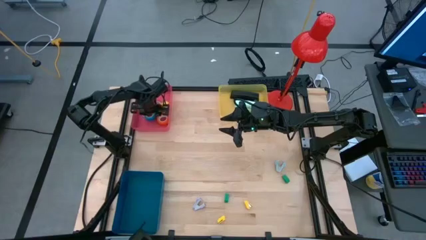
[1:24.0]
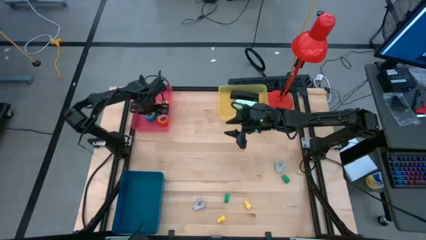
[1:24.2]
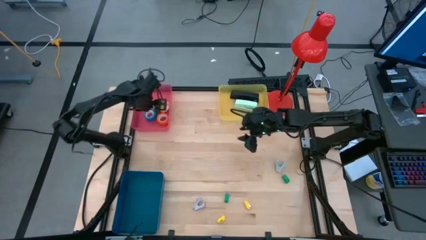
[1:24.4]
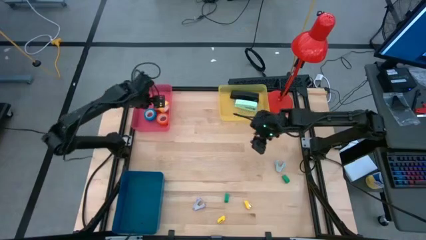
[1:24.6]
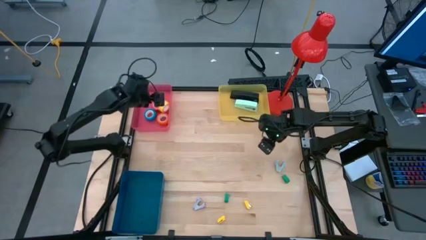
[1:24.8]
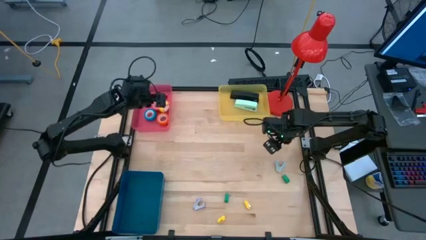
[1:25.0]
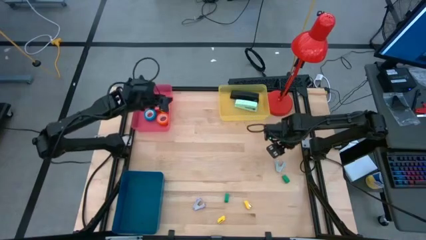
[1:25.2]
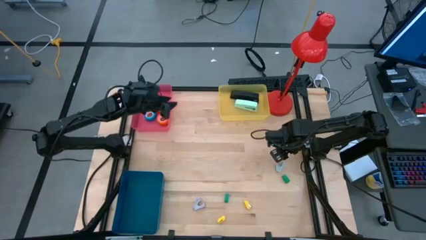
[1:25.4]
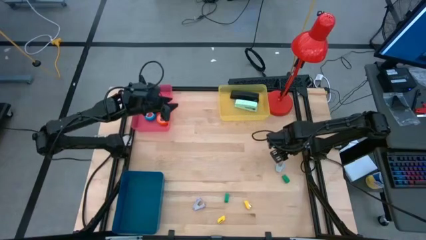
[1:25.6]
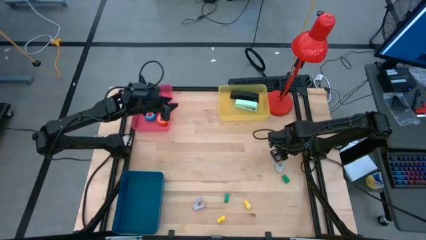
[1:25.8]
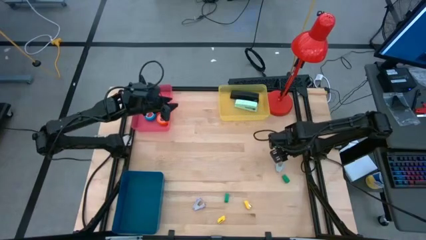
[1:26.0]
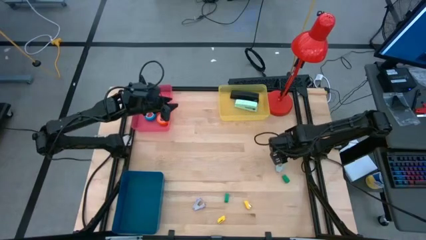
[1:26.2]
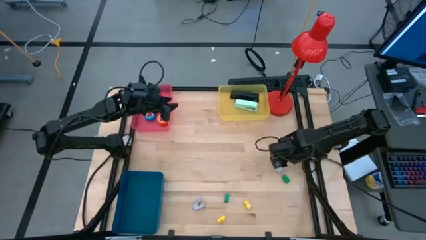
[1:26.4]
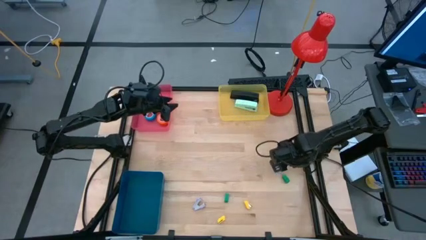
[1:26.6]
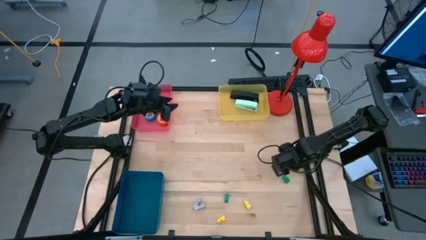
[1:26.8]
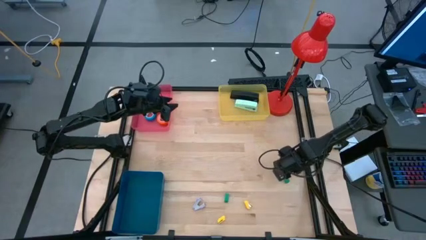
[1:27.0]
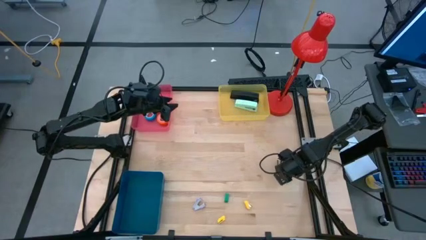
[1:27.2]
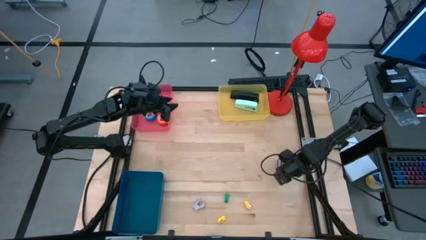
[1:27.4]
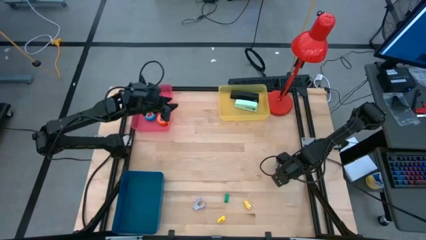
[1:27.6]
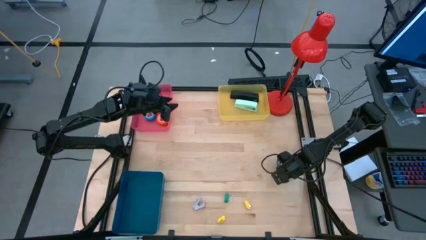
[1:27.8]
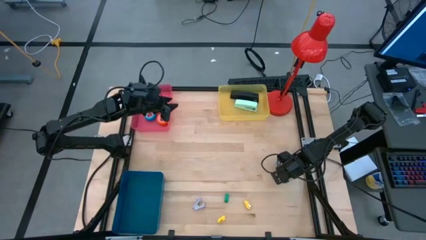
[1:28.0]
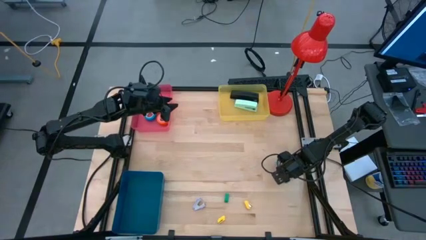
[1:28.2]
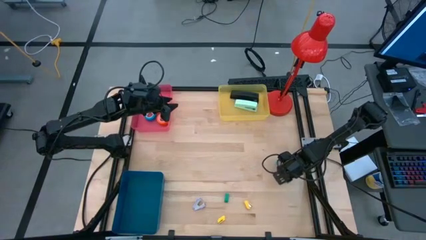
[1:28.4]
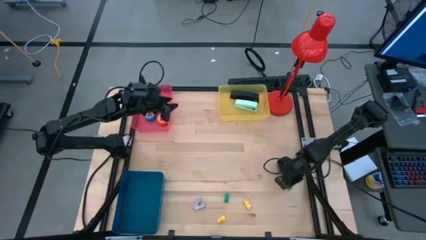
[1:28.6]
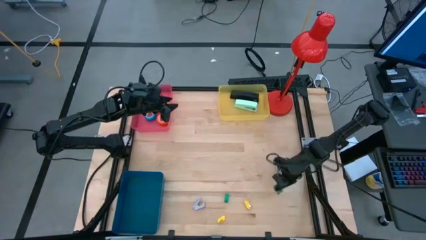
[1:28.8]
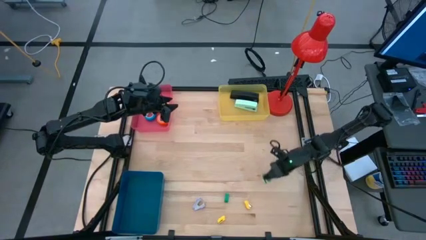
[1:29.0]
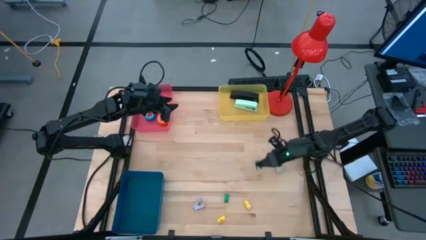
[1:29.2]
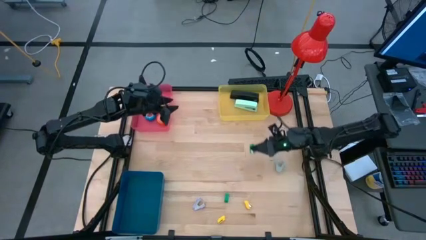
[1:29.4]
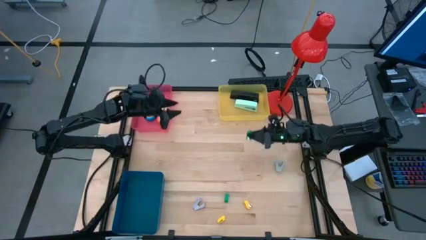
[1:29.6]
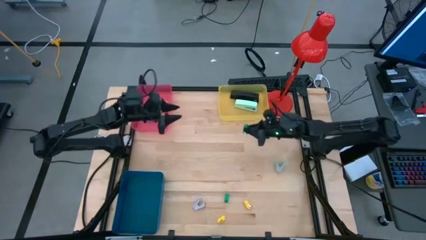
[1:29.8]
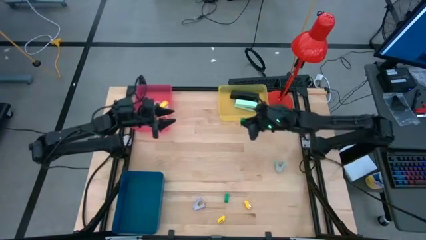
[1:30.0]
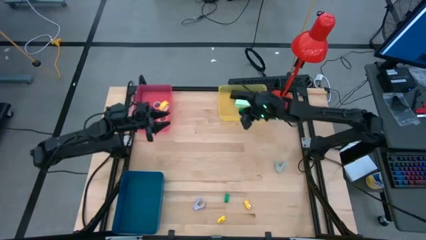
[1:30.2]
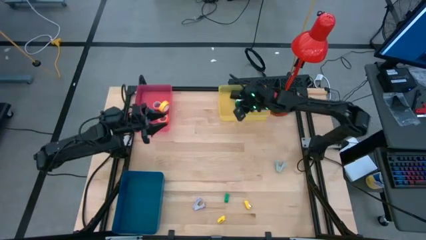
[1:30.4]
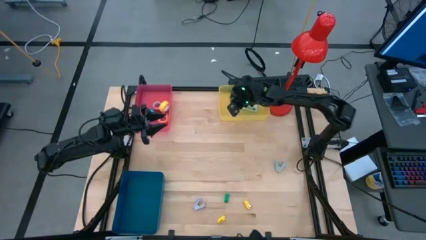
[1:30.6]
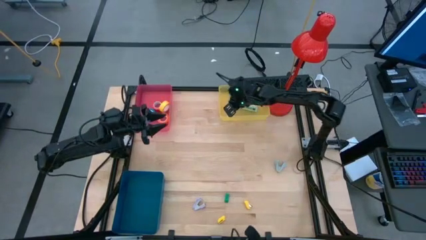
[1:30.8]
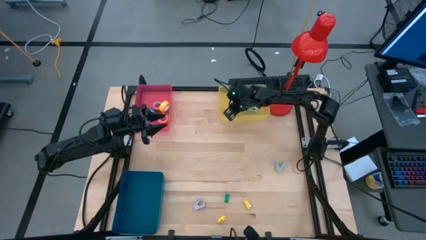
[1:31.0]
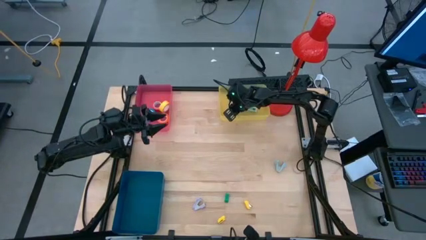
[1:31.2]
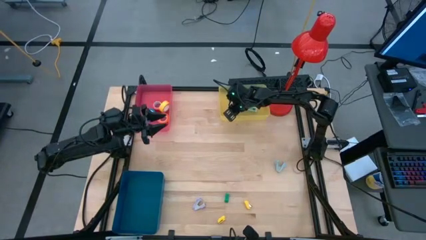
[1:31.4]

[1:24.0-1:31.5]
Task: Pick and place Stapler, Stapler remover, tape
Put the small green stapler into the yellow bin

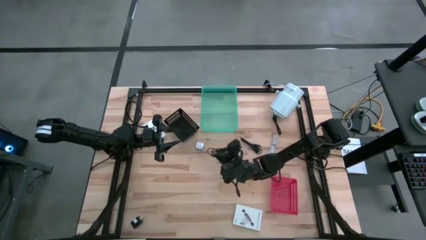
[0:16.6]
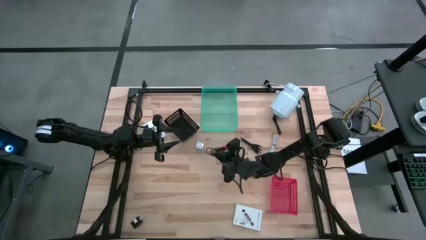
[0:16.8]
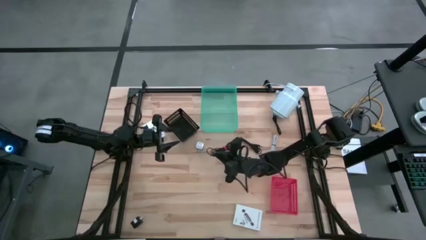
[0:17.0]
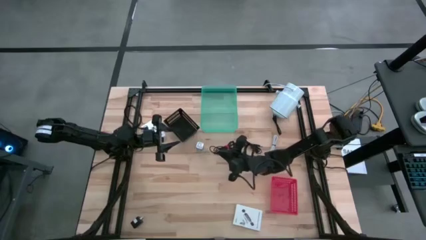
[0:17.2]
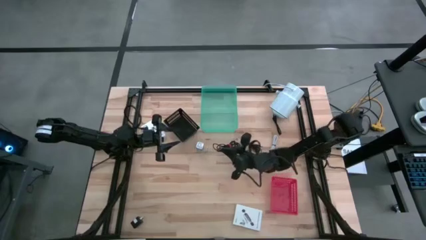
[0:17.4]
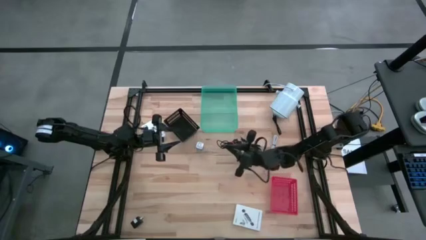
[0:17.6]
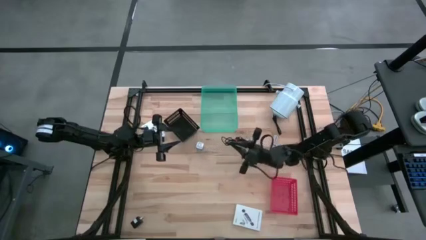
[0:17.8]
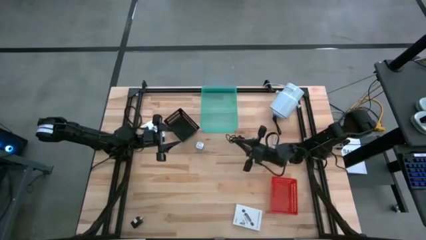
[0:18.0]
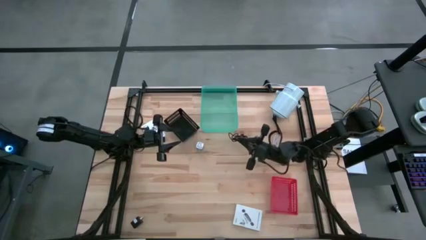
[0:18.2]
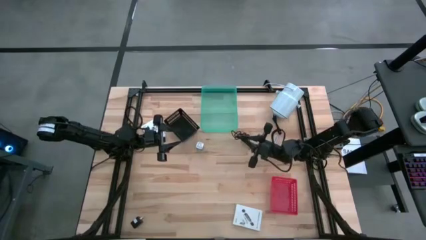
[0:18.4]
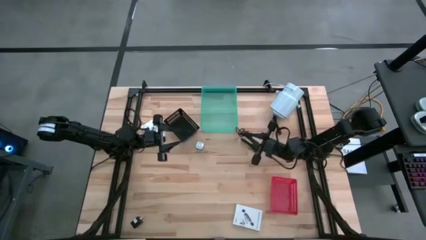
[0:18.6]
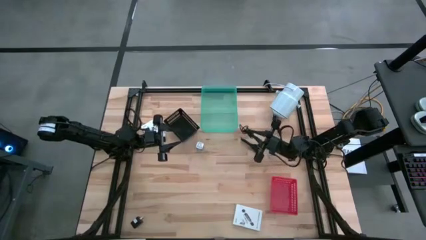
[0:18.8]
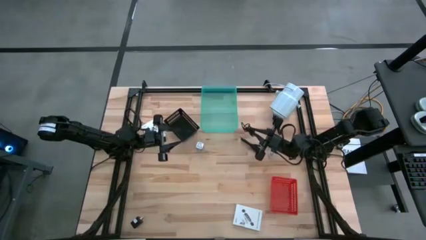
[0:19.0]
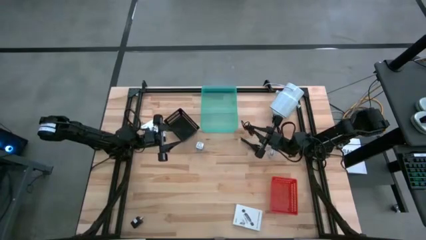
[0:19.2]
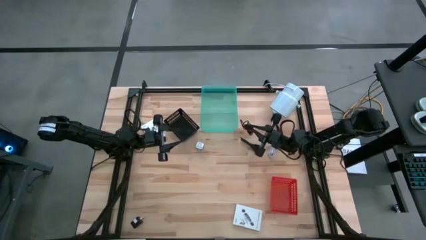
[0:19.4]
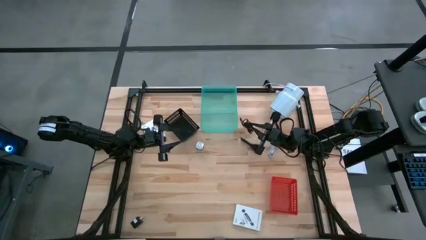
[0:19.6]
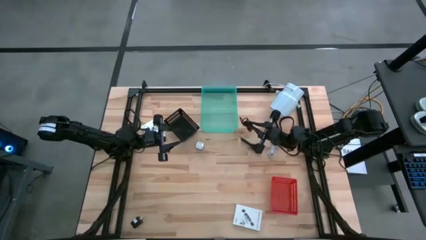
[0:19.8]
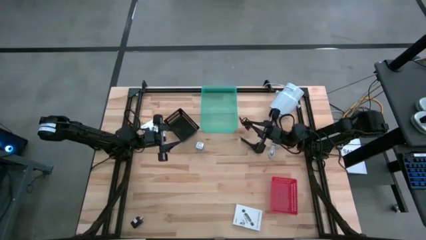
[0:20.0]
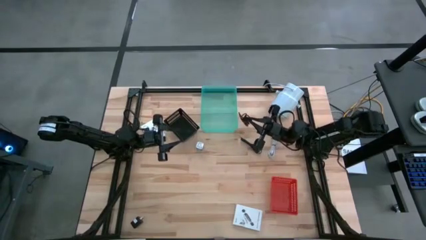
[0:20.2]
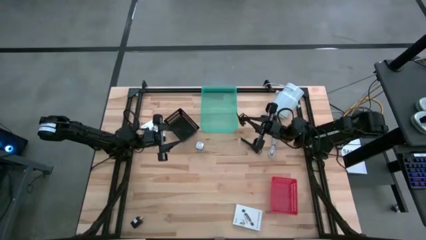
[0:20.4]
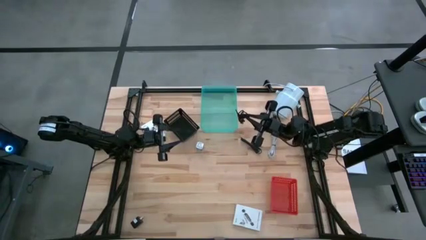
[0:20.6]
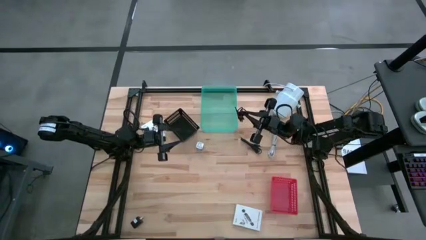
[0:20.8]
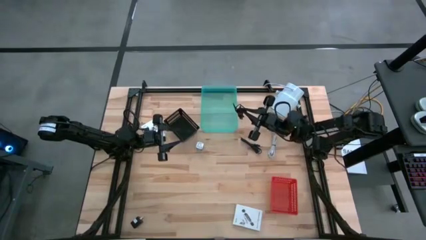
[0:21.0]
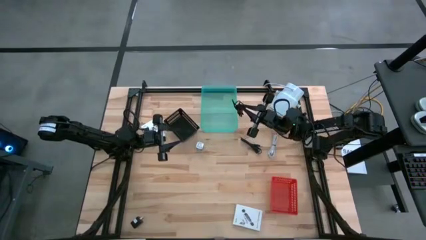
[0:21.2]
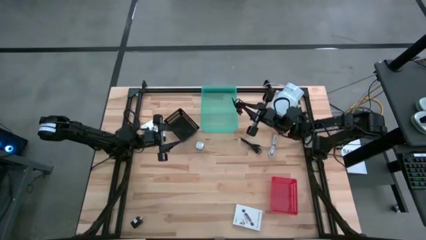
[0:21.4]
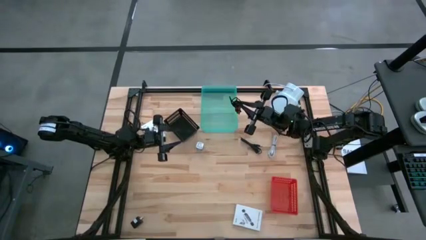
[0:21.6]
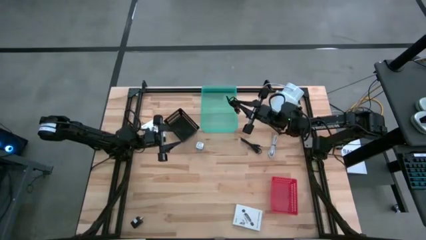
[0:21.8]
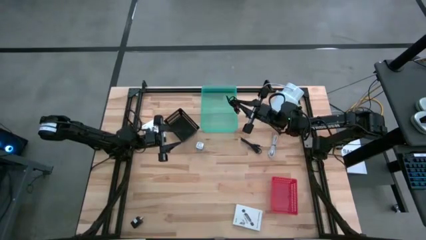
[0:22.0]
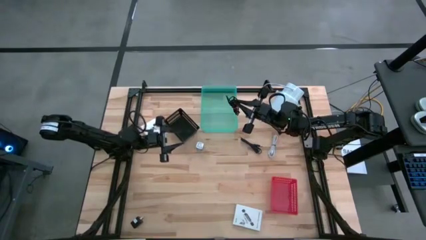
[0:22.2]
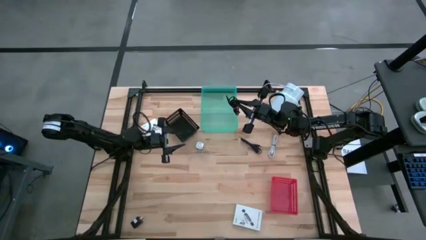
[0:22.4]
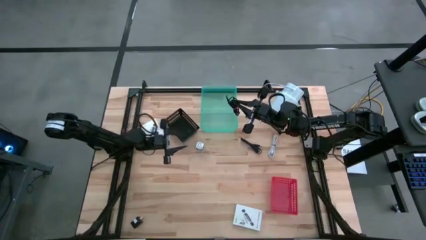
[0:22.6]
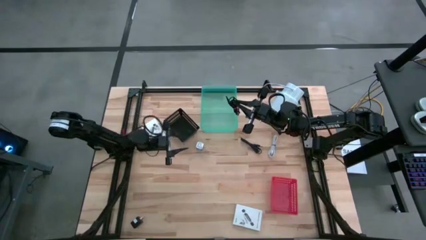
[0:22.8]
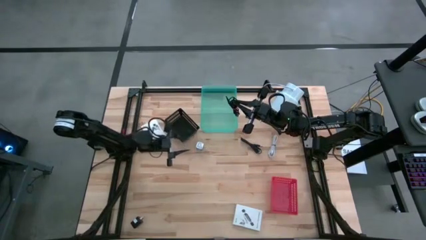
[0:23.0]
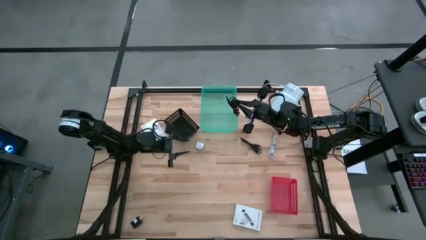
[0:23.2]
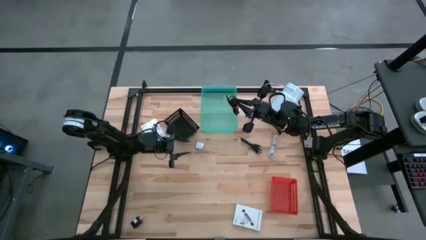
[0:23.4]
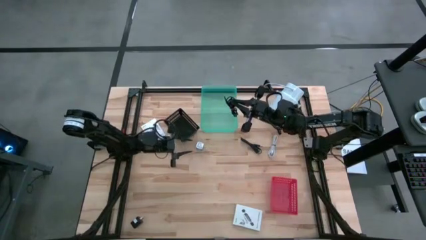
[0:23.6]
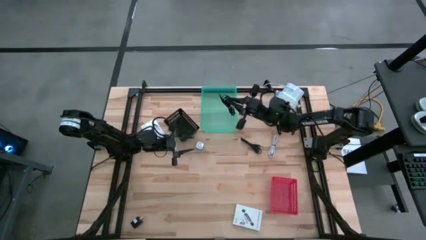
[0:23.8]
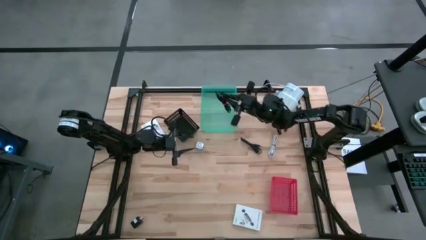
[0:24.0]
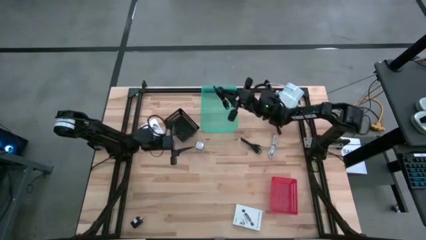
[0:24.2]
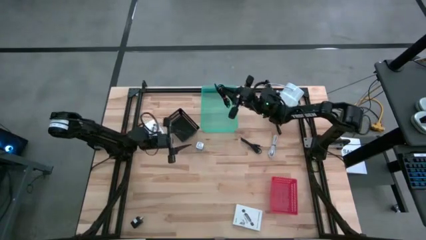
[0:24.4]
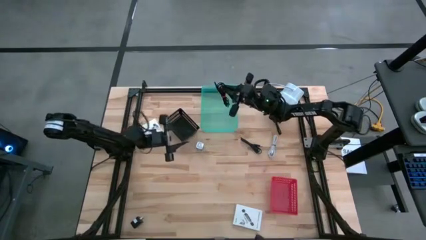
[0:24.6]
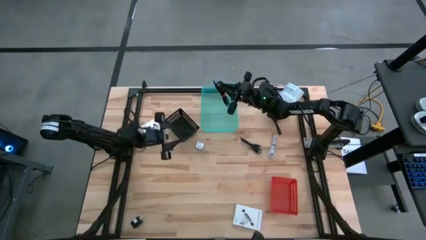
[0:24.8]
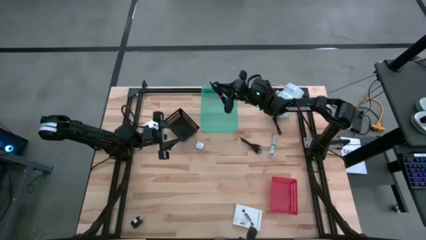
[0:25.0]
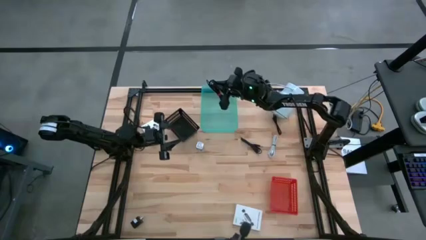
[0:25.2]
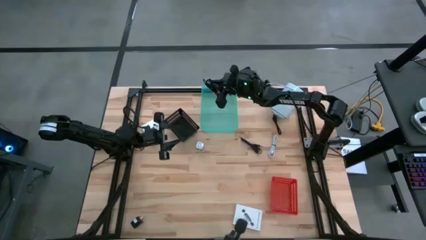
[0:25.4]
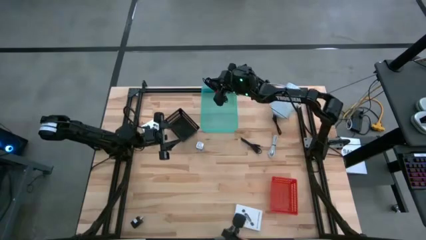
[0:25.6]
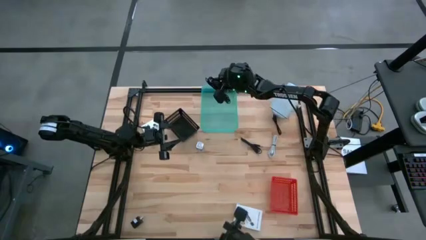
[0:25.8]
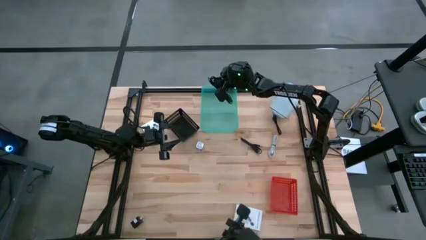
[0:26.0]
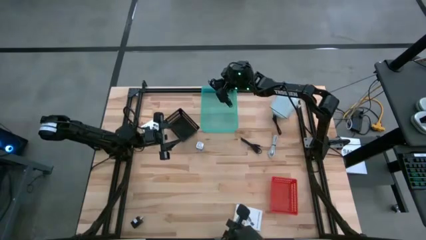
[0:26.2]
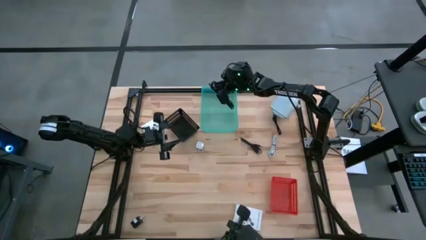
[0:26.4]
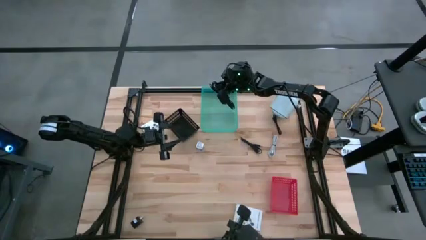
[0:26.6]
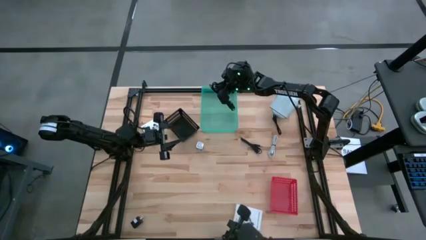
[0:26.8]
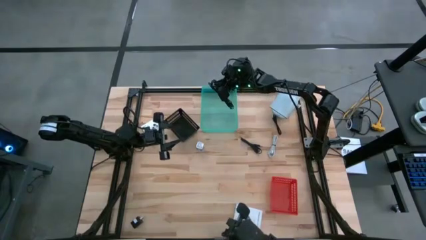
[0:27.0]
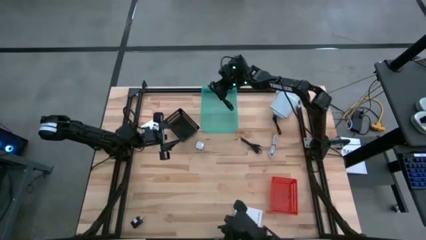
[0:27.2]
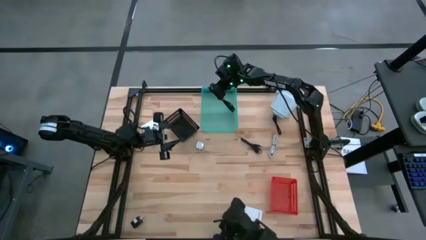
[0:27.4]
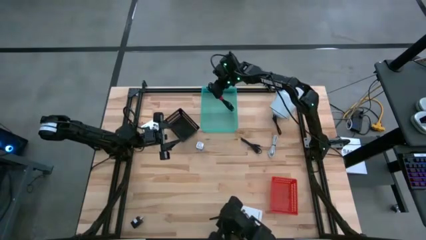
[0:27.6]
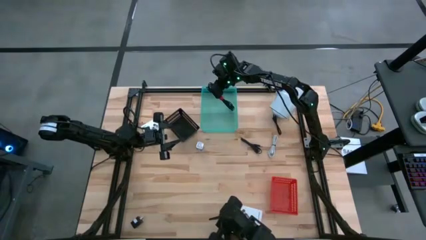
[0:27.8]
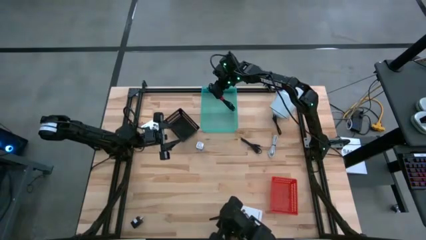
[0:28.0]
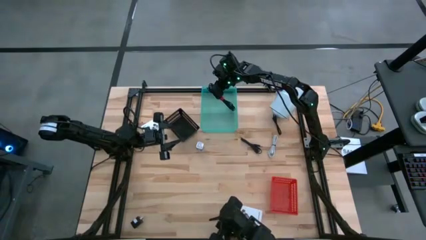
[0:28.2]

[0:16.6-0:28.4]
Task: Pick and place items into bin
Put the bottom black charger cable into the green bin
